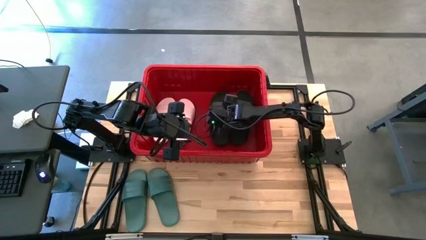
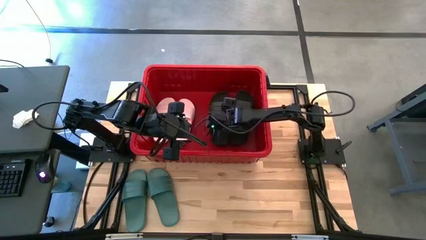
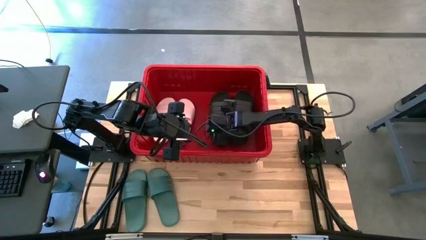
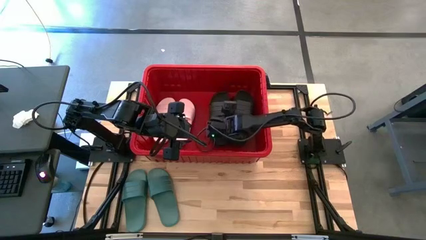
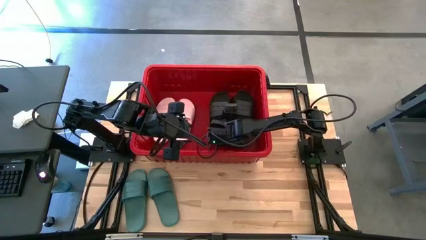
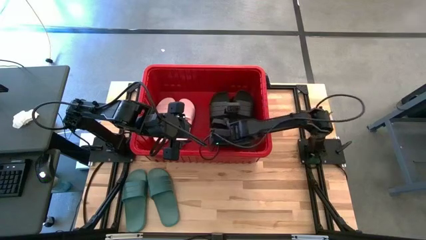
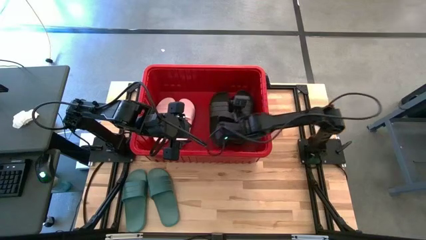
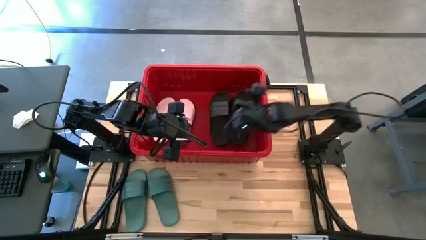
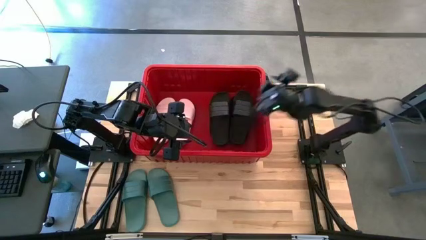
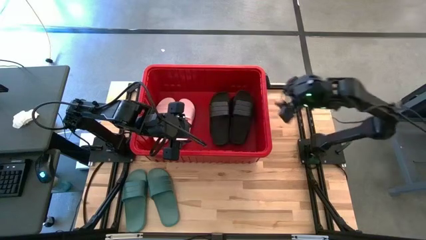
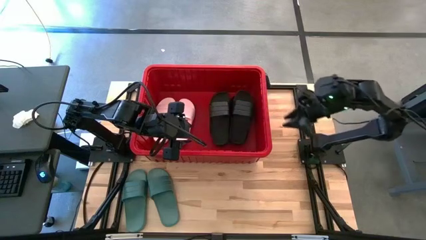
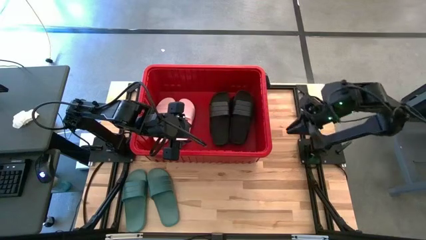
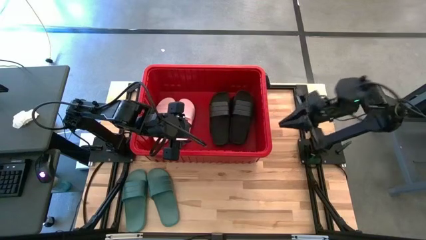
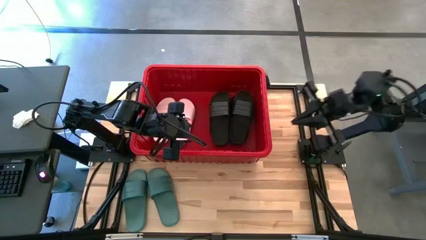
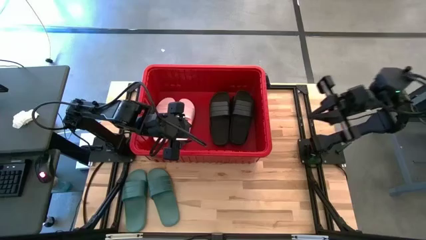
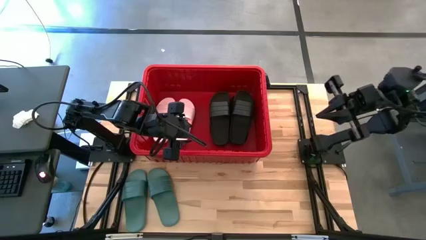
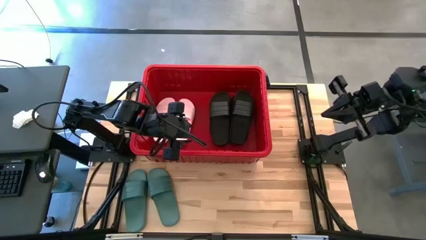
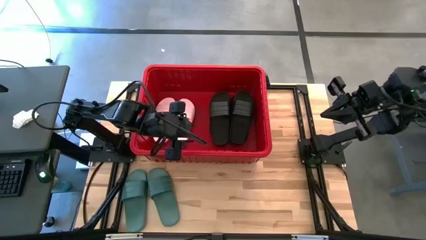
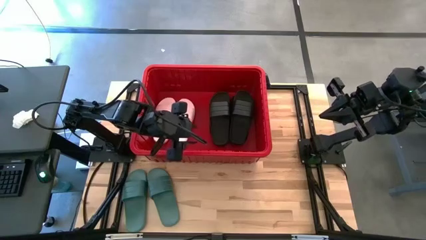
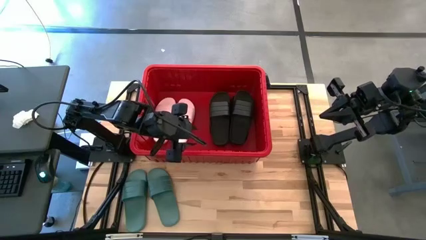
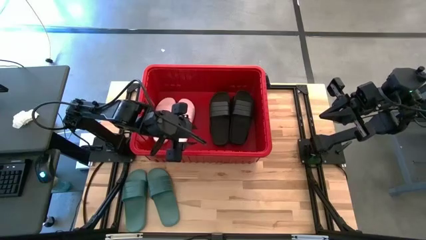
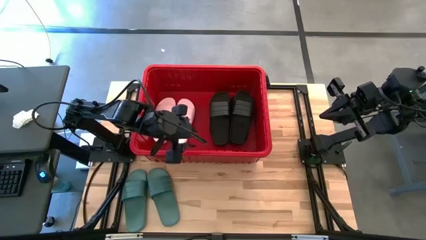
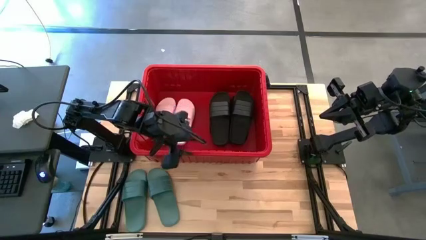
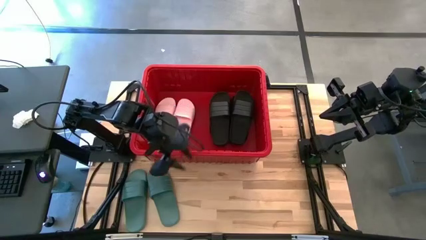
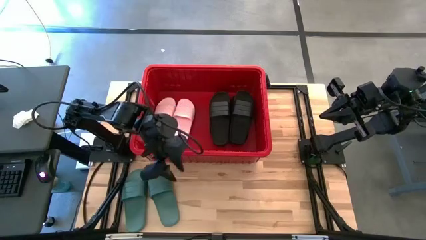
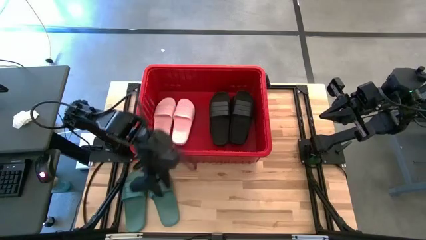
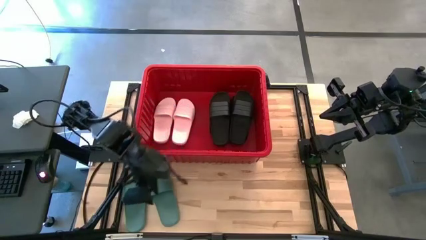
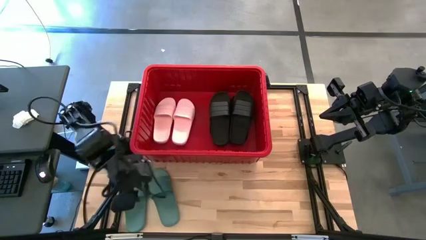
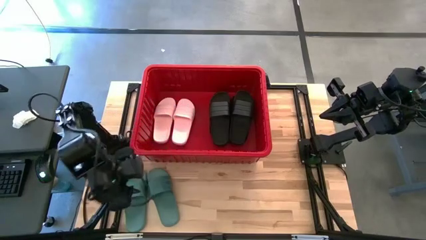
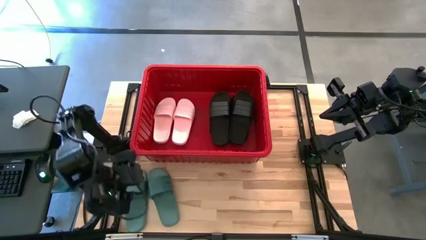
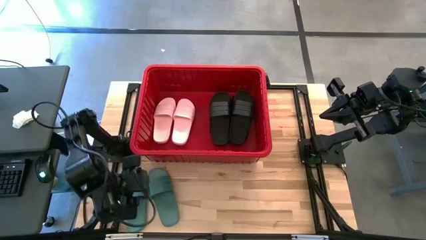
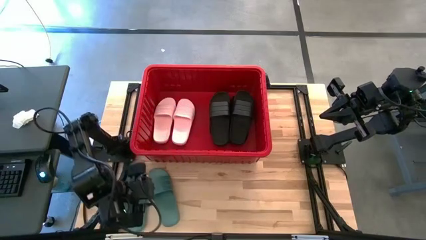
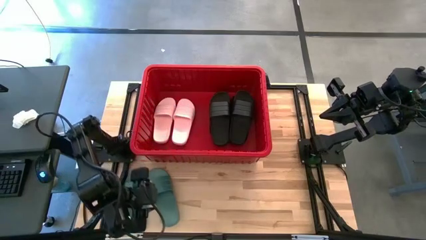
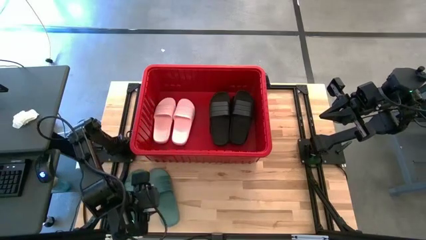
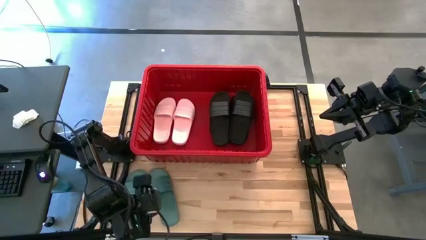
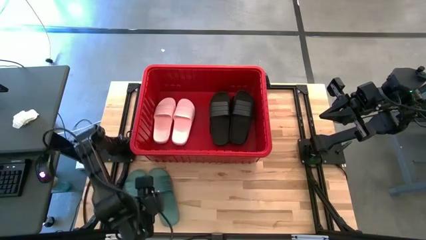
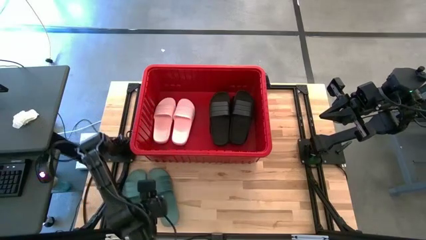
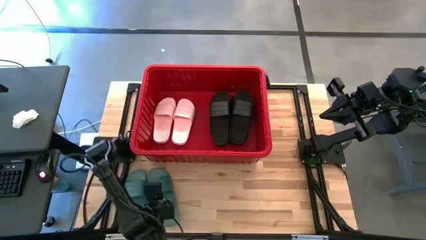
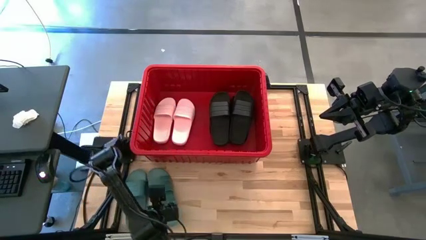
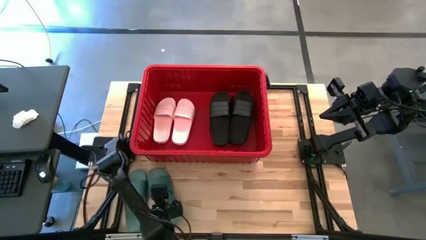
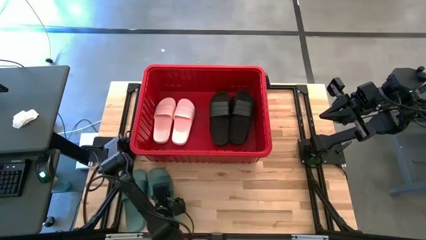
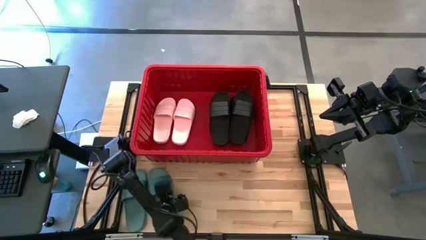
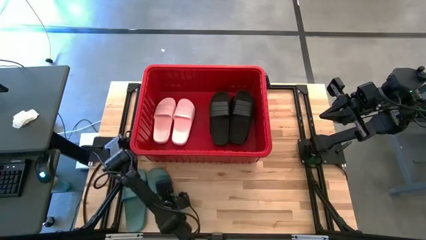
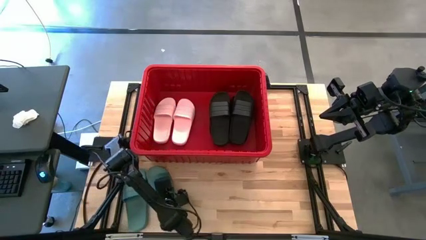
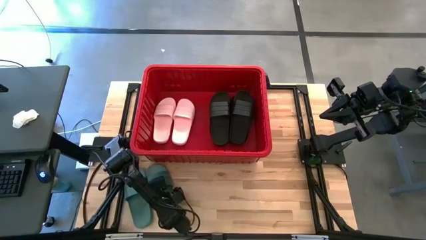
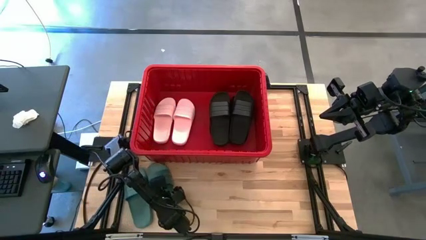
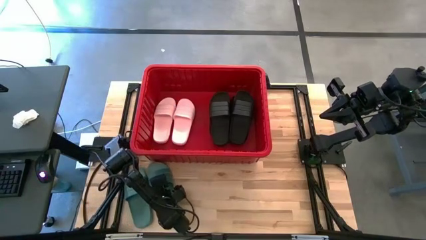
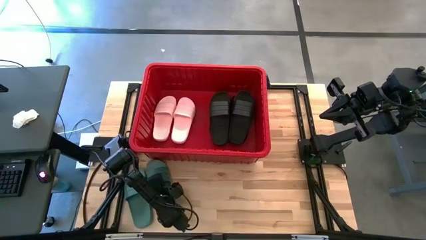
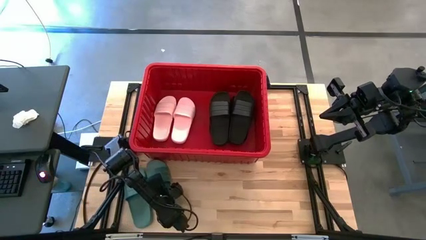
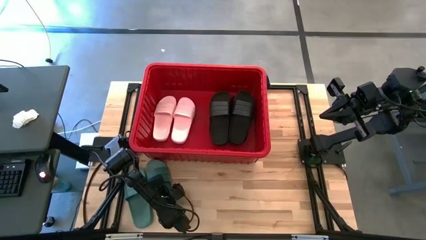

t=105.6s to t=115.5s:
Task: Pick and place slides into bin
Put the green slide into the red bin

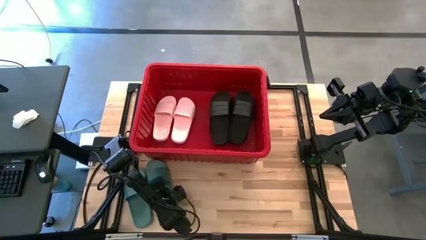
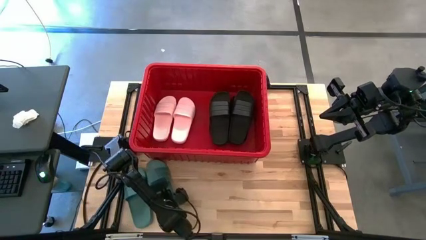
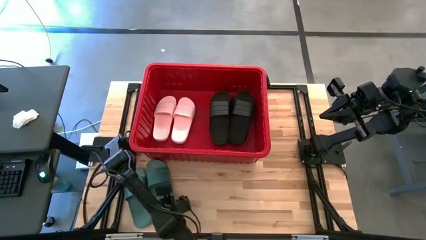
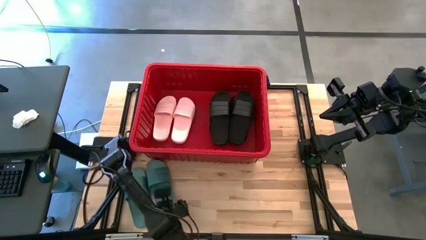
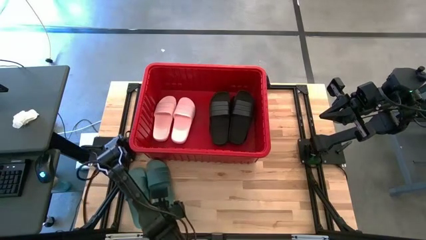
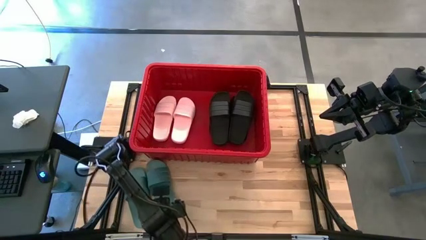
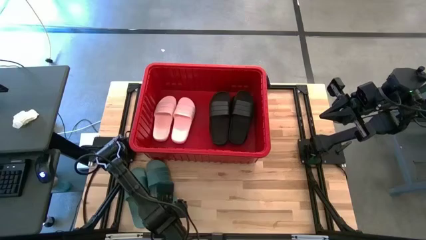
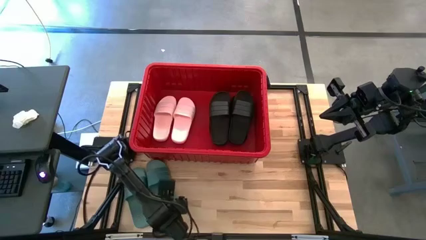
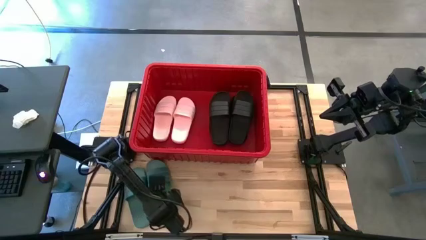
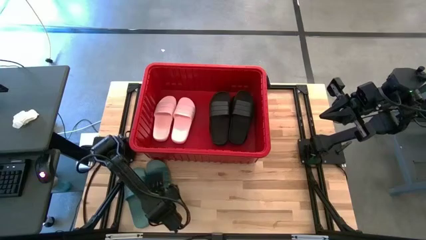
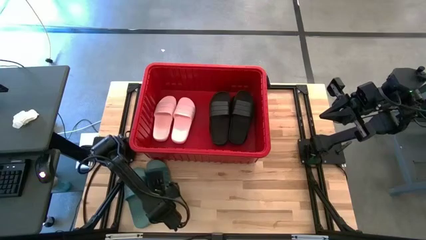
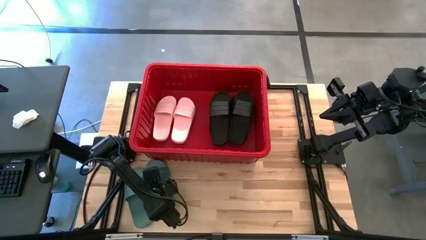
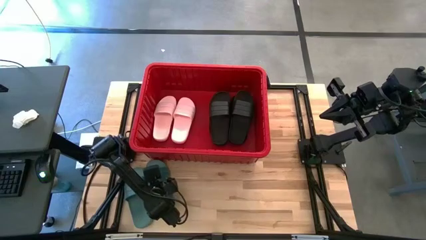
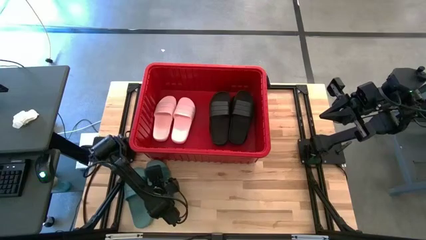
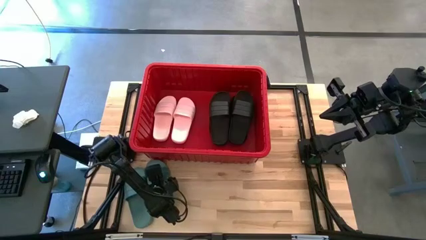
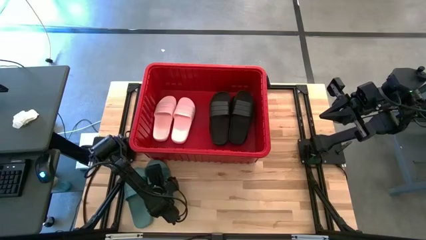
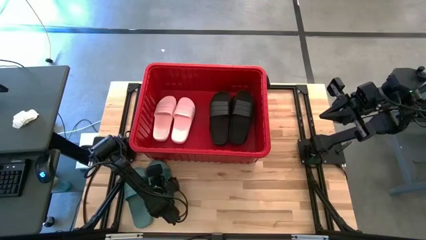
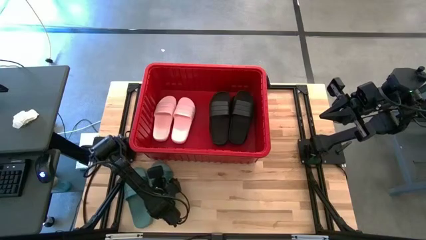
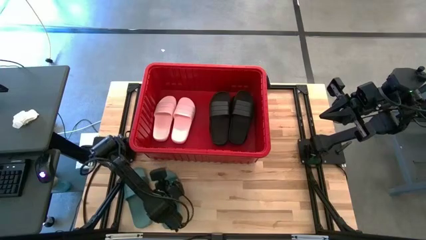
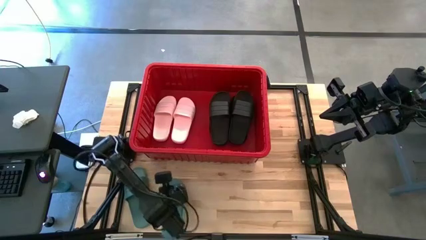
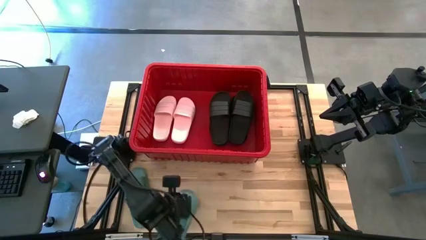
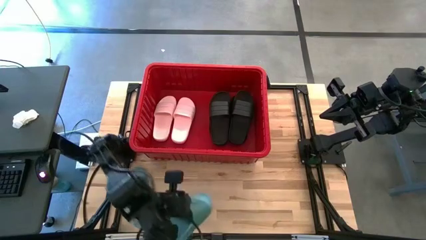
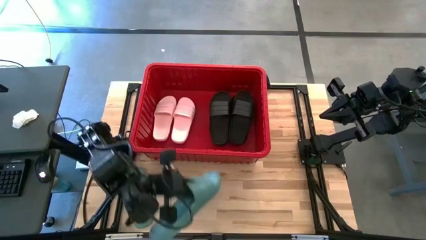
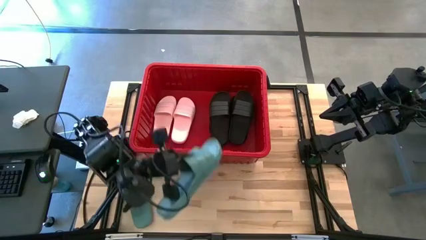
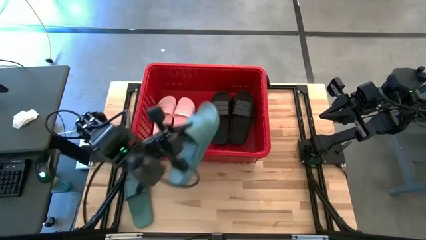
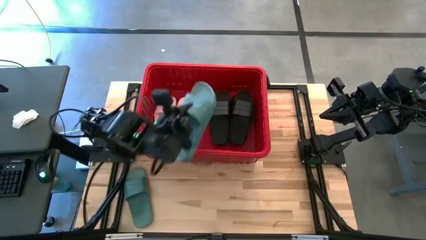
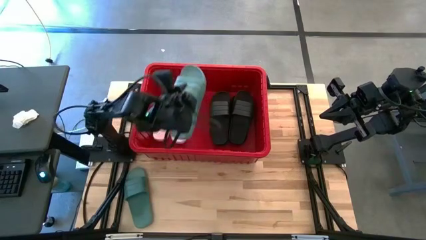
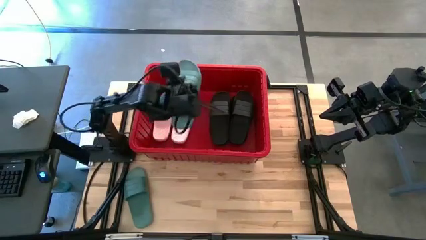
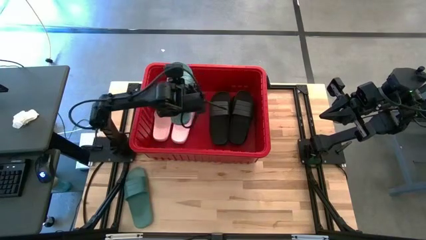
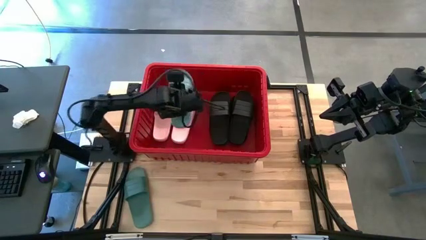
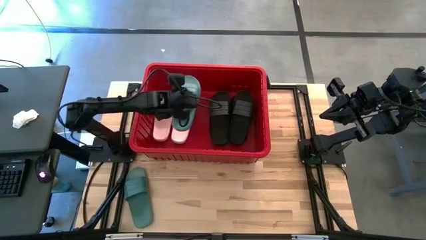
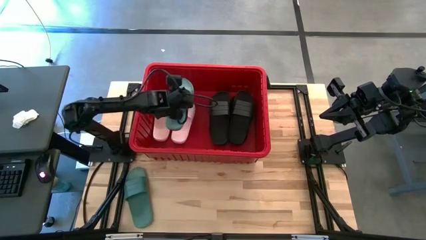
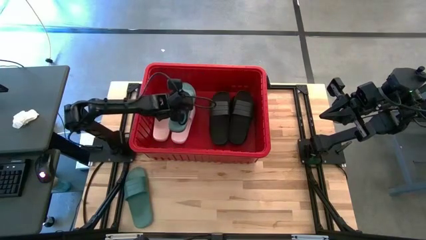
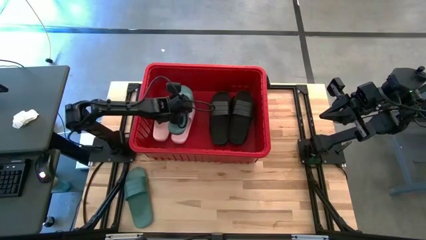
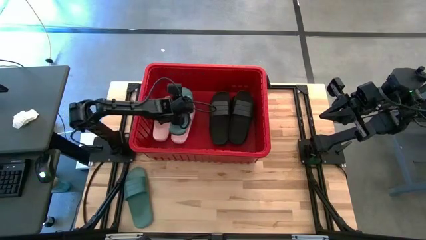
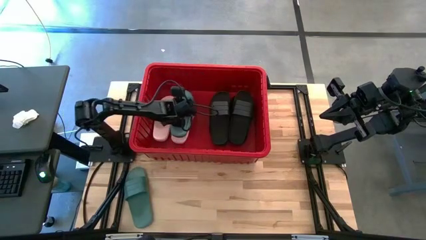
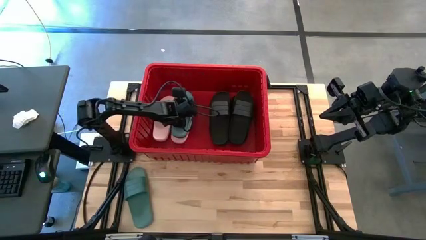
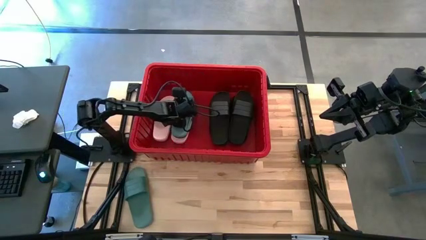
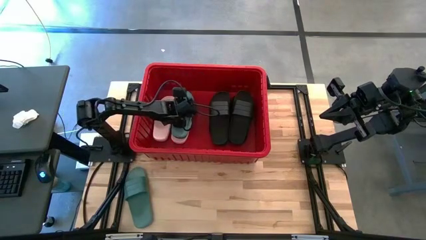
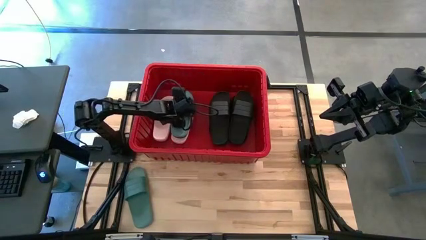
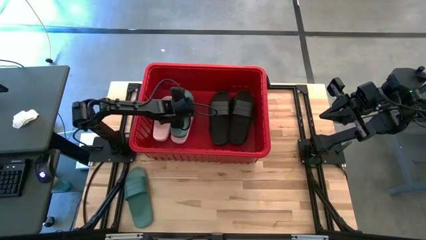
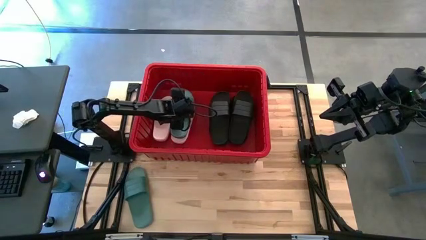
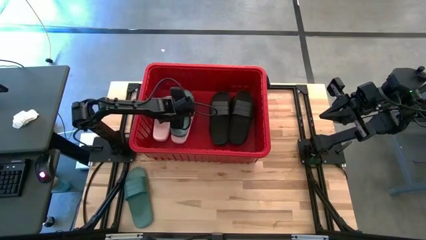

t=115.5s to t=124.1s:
Put the green slide into the red bin
